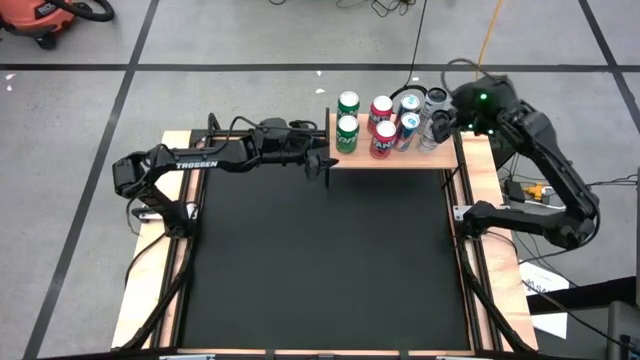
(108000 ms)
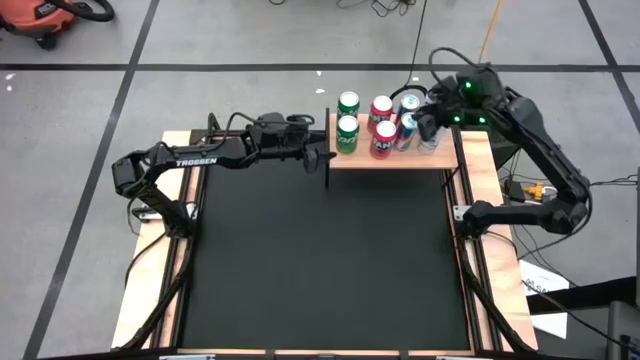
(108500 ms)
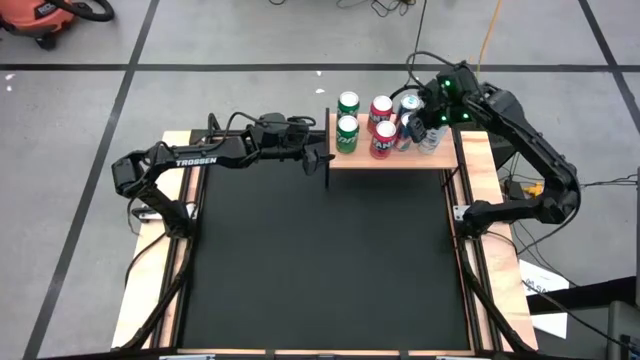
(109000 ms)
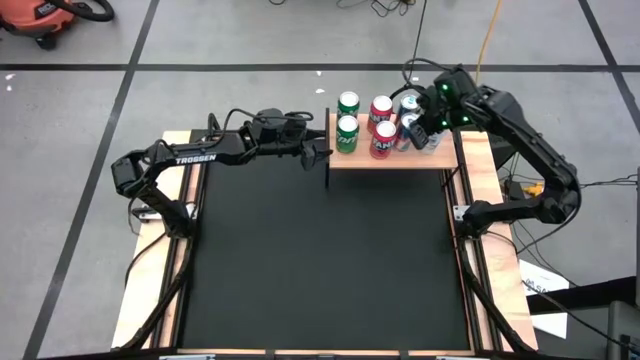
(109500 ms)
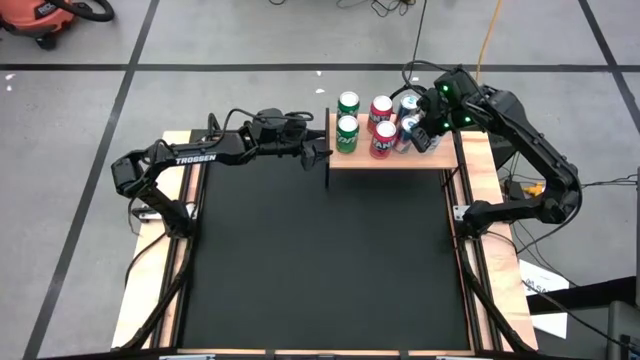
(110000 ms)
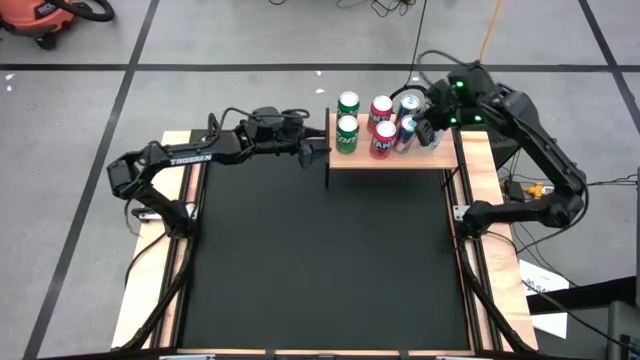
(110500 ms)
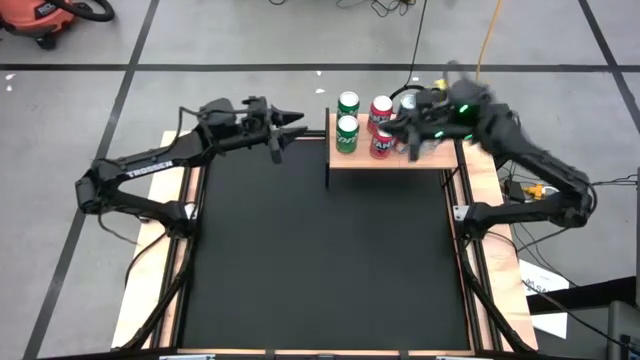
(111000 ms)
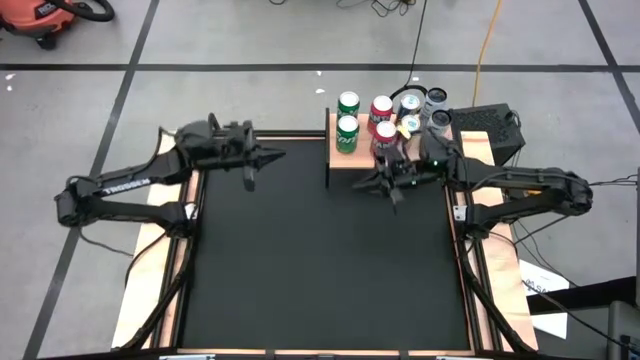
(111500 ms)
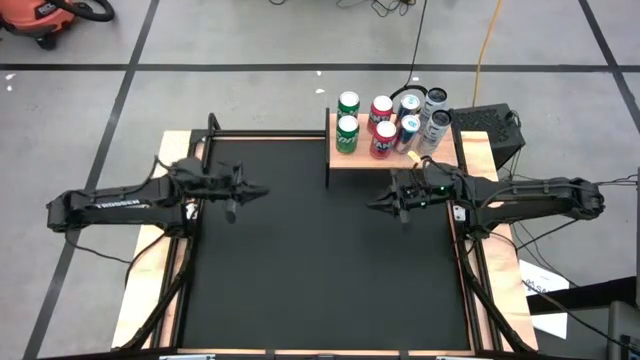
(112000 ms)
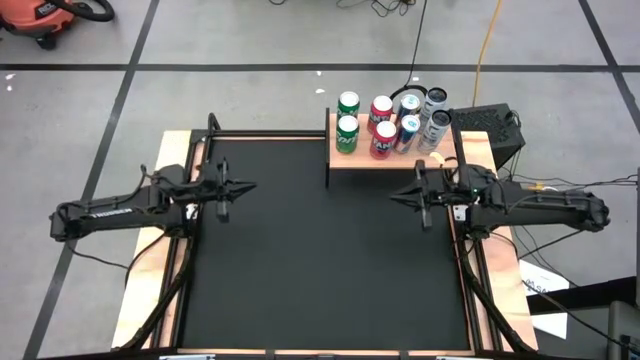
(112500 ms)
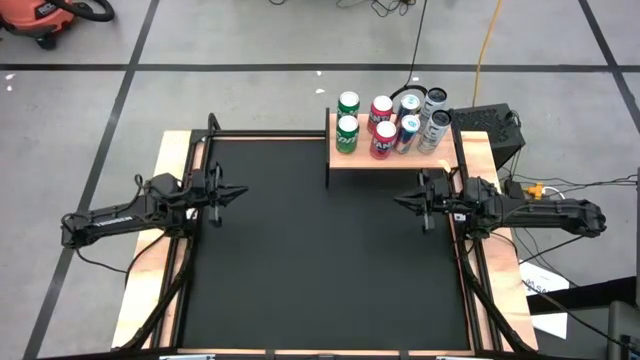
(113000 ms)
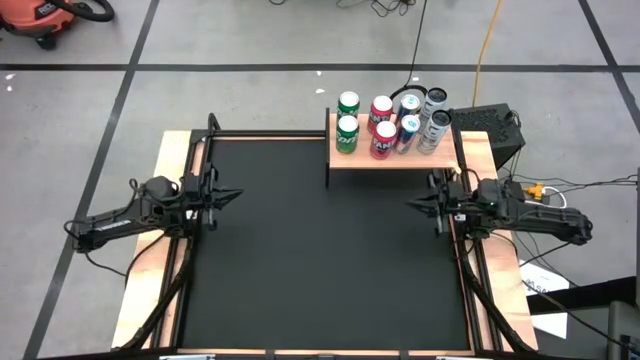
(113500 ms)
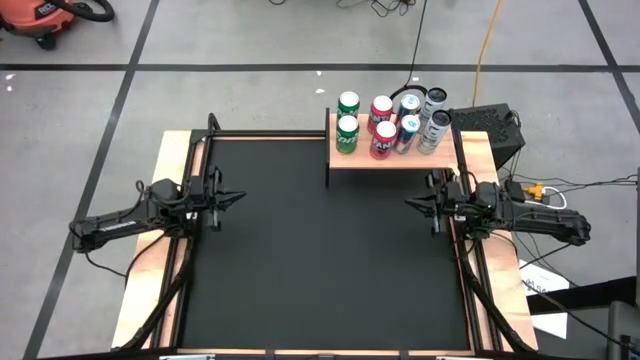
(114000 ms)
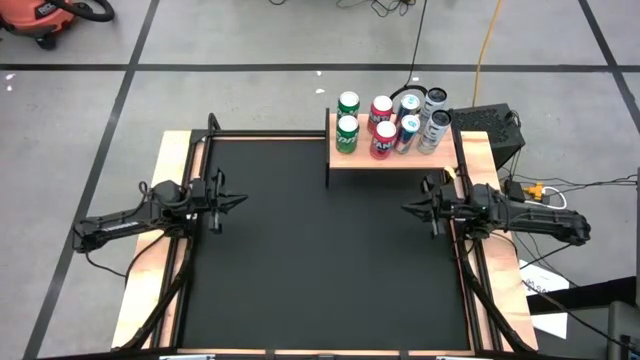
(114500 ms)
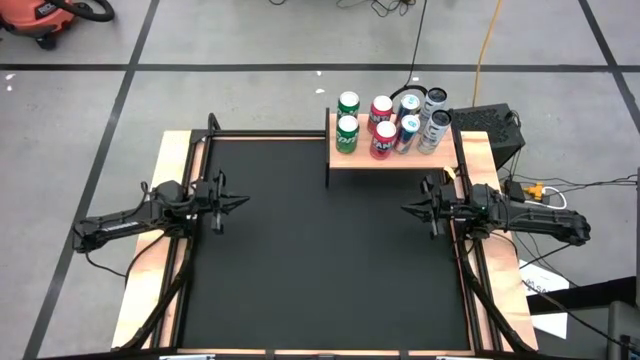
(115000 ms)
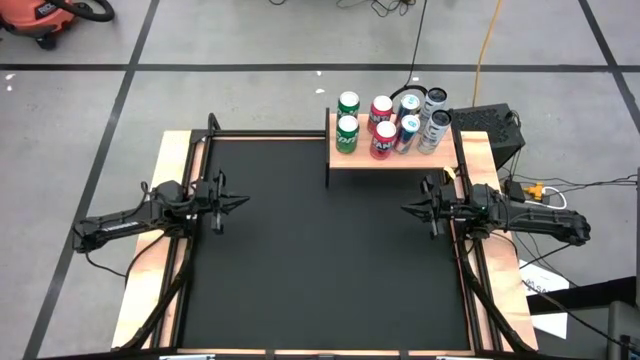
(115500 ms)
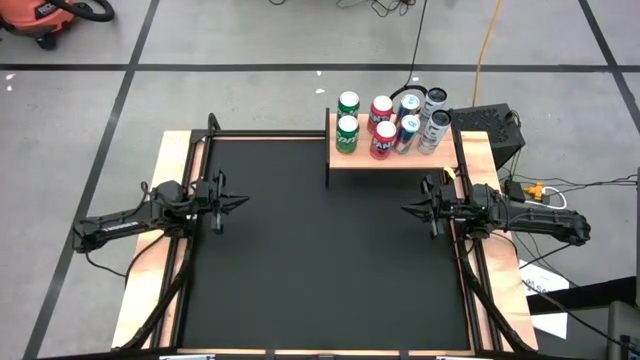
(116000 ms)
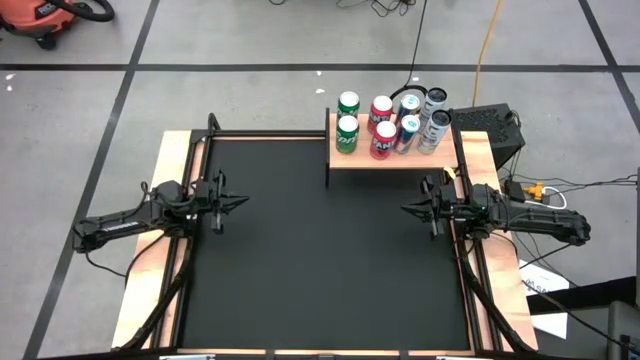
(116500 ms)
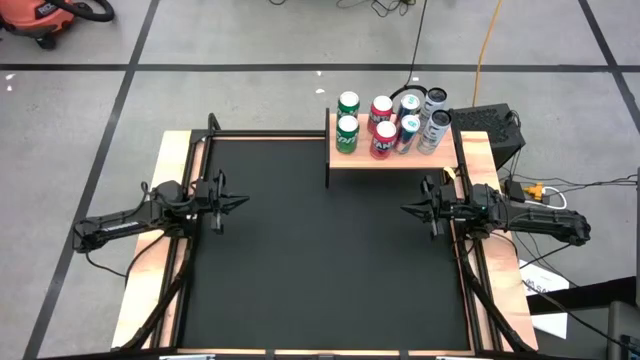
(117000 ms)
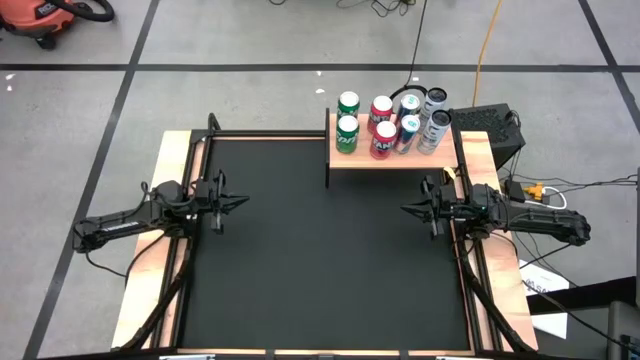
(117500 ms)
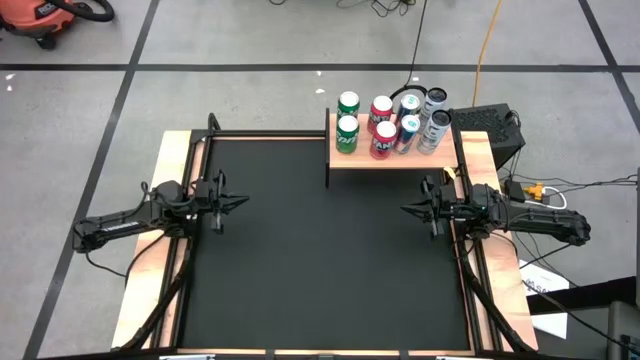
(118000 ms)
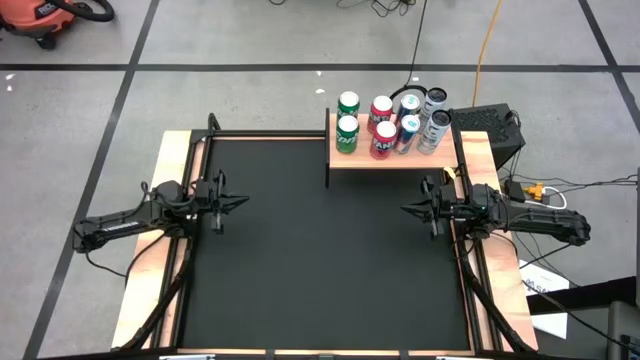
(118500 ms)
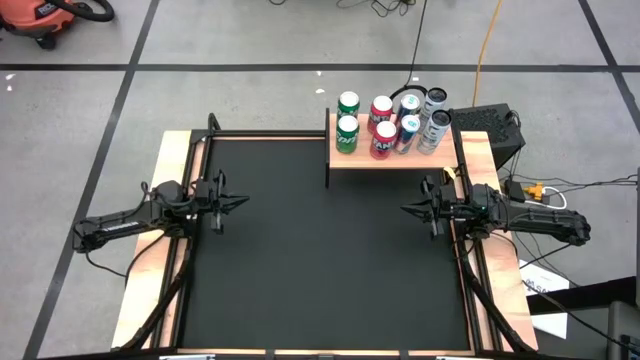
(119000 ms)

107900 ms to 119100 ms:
Task: Place canned beverage on shelf
Return to Home Position

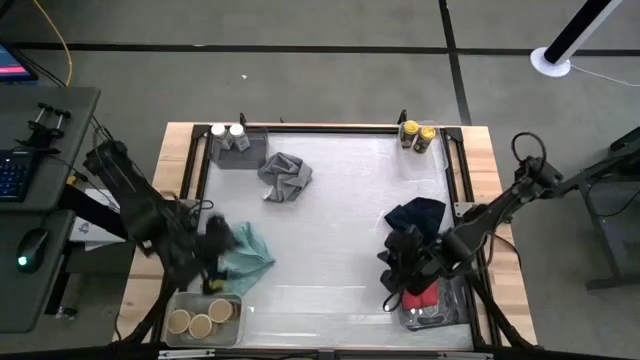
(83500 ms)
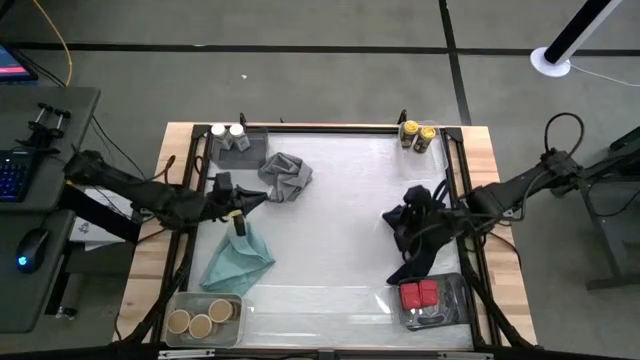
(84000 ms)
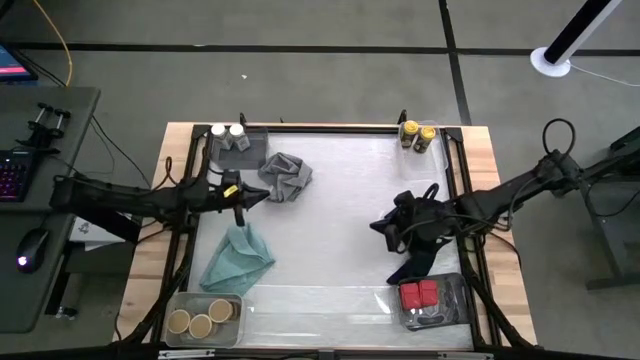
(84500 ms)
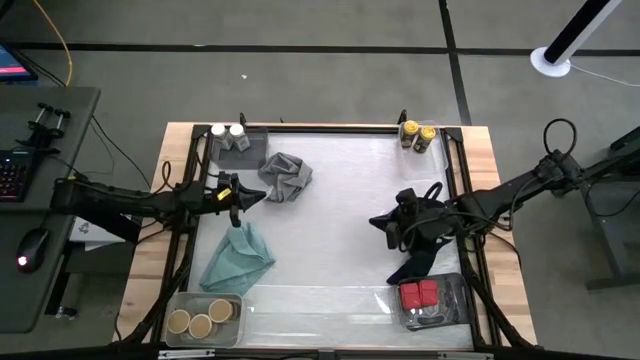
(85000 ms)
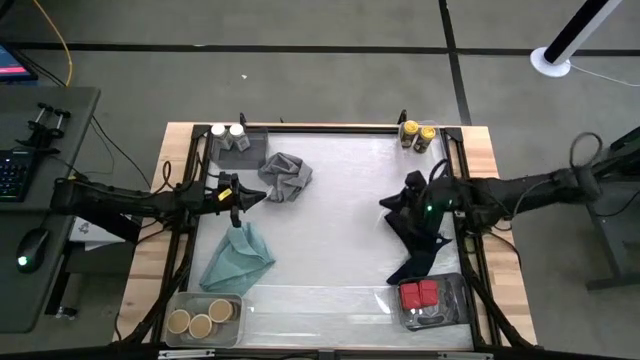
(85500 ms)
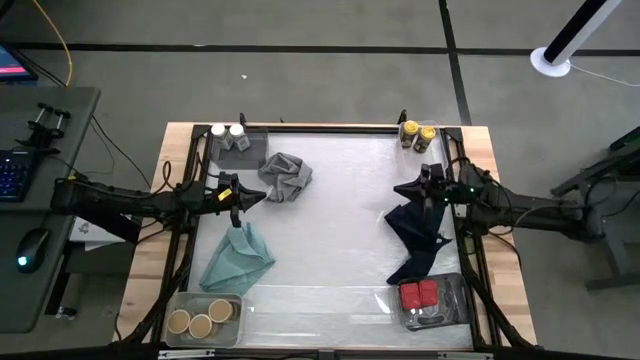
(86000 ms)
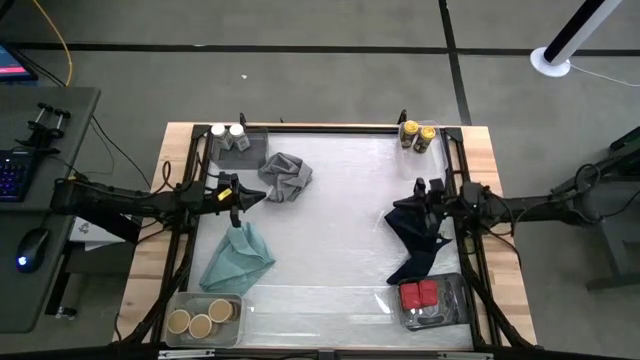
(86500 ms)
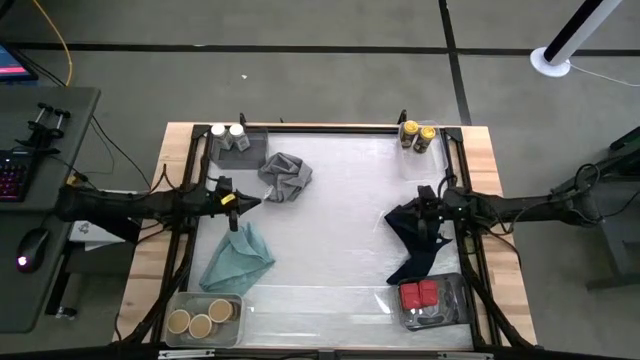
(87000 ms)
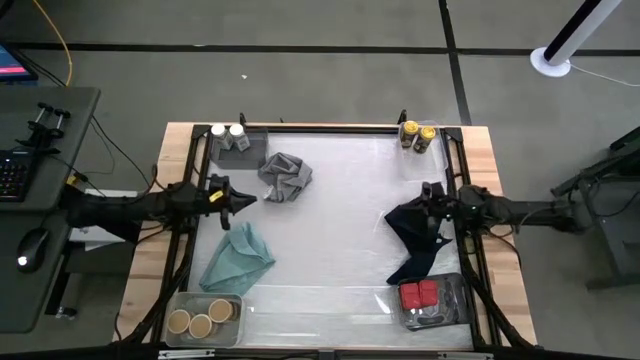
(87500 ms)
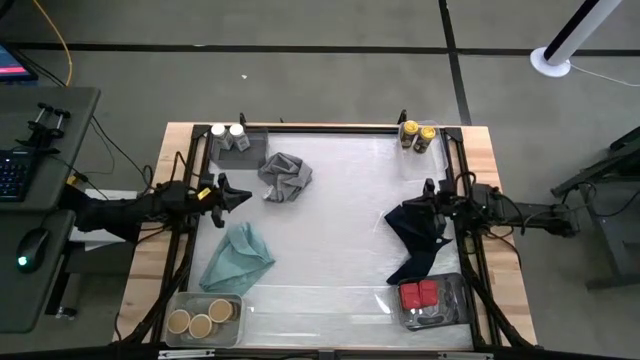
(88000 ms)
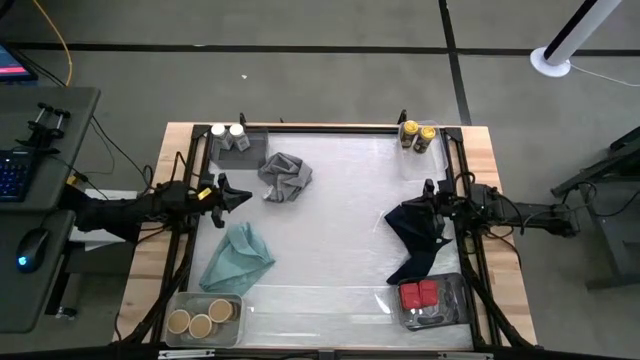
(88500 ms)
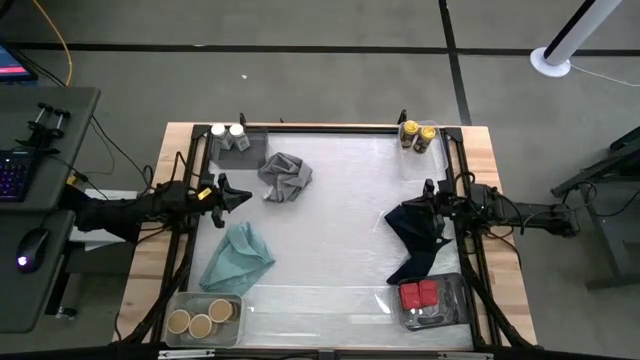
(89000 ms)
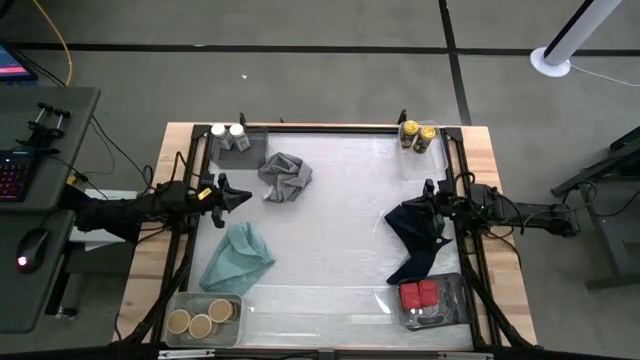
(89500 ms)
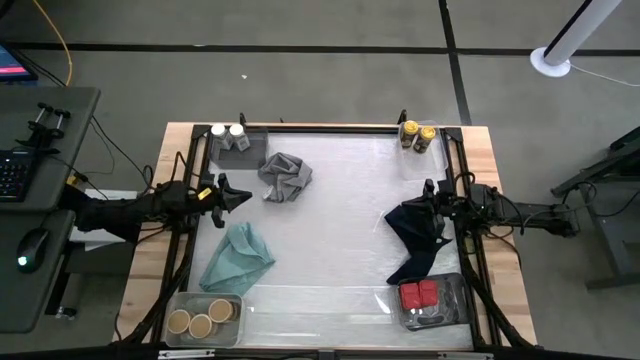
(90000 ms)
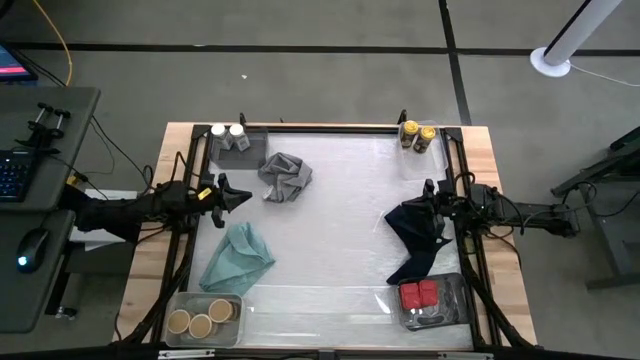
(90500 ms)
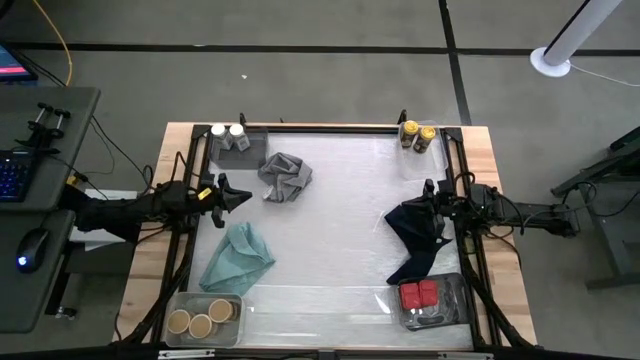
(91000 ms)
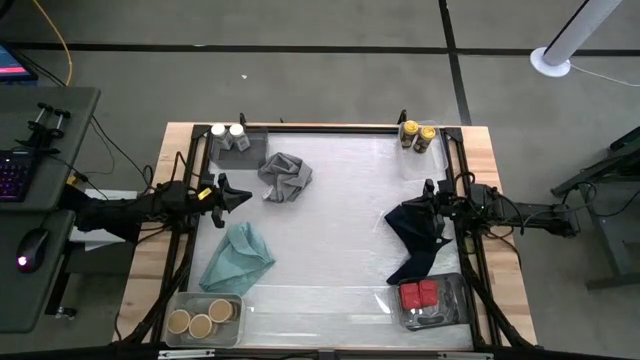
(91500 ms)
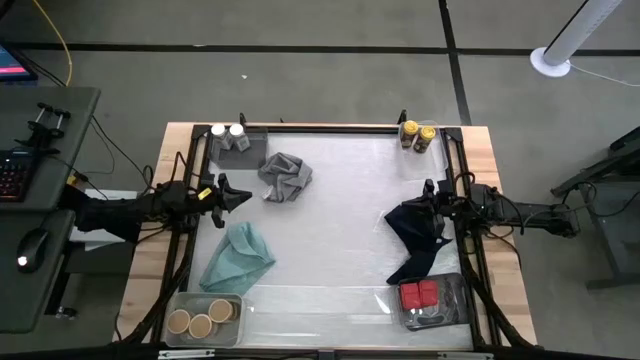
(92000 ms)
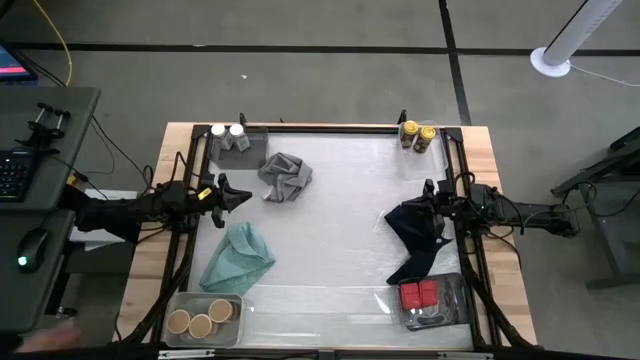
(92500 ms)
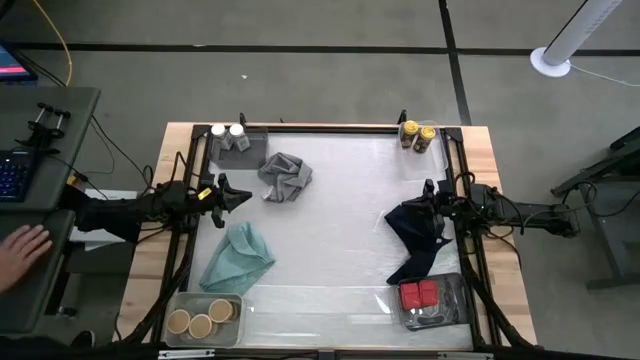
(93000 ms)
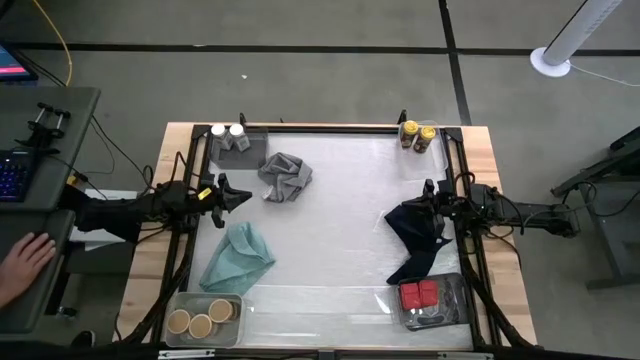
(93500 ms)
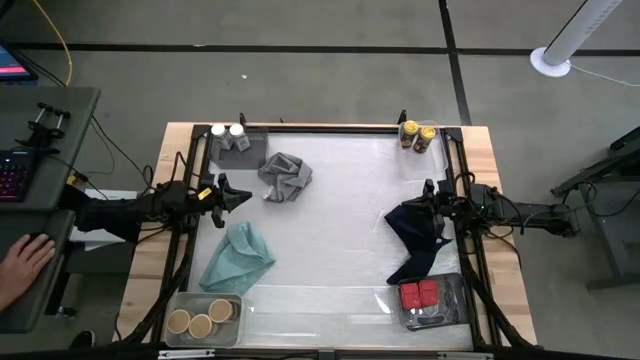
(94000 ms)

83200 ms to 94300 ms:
Task: Sort spices by type
Return to Home Position
